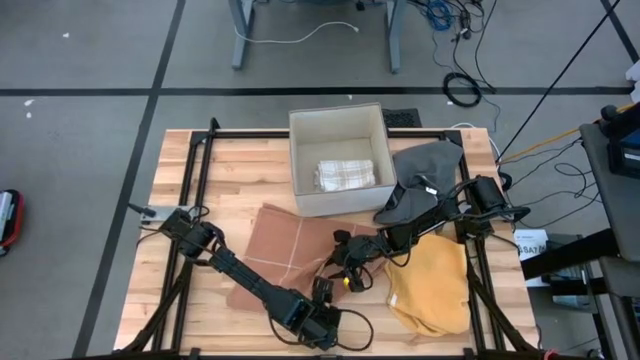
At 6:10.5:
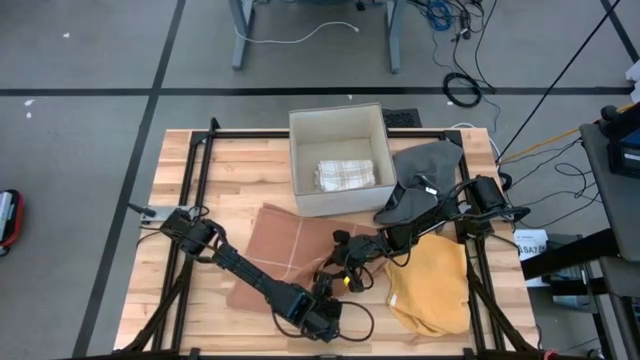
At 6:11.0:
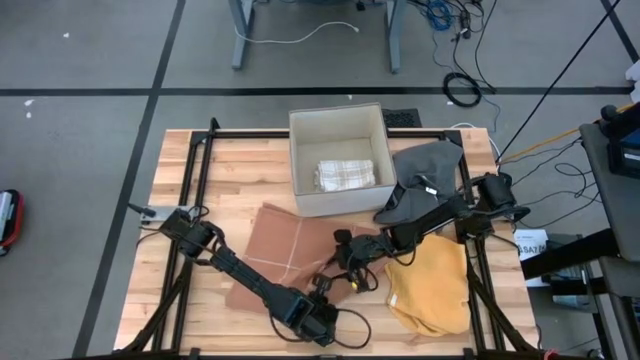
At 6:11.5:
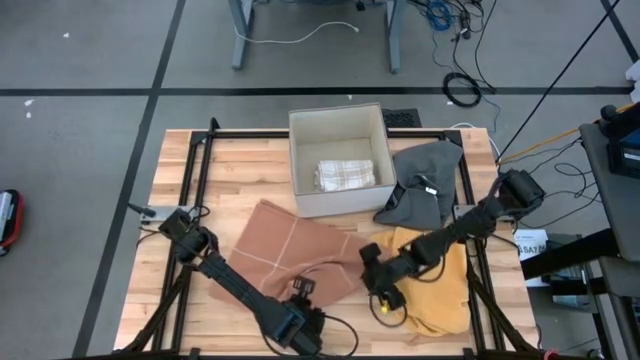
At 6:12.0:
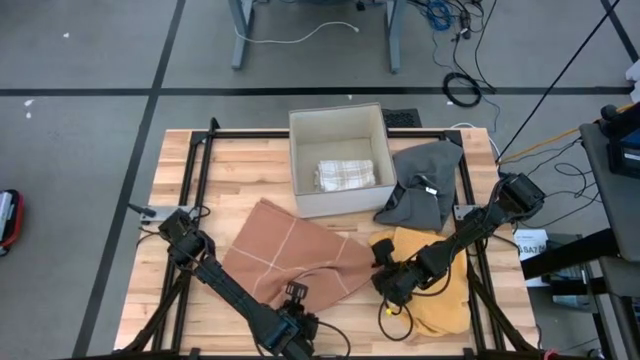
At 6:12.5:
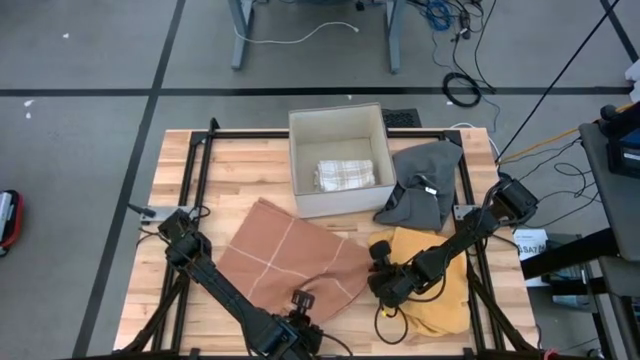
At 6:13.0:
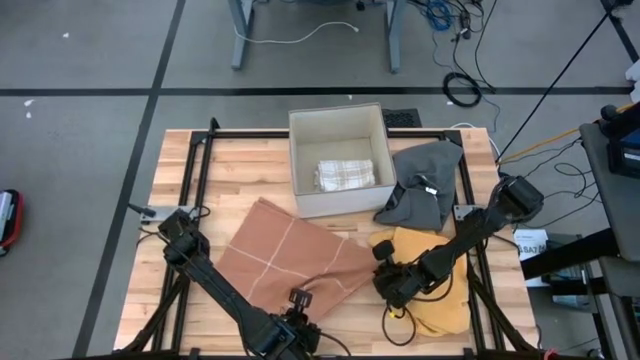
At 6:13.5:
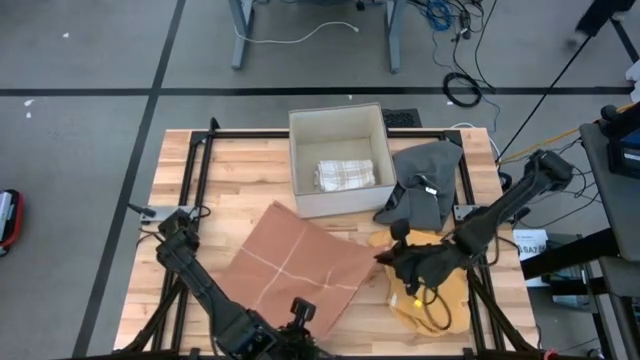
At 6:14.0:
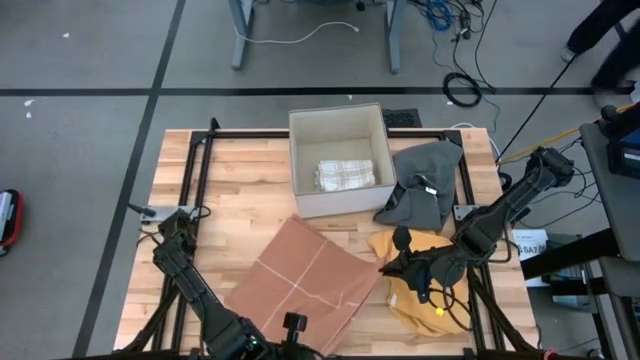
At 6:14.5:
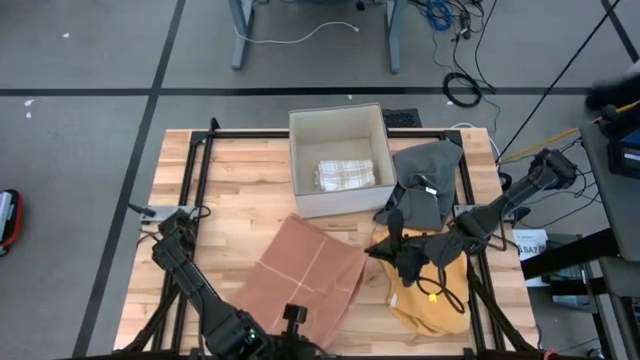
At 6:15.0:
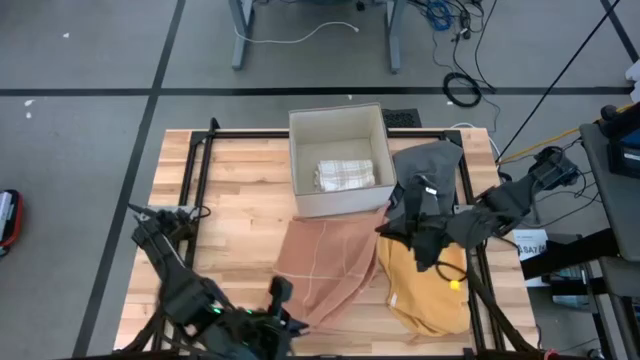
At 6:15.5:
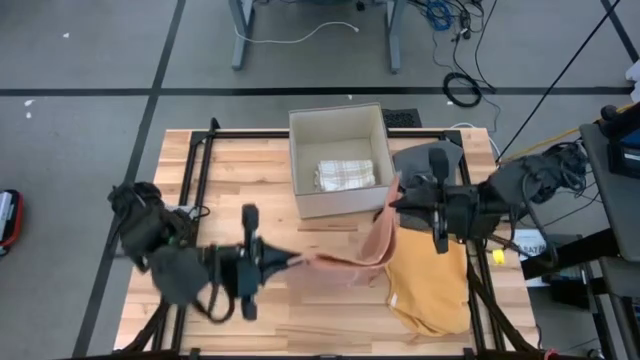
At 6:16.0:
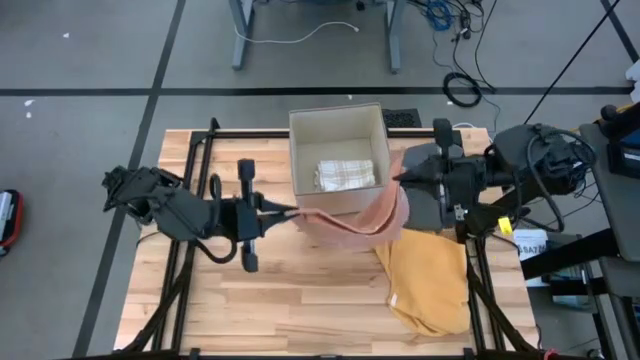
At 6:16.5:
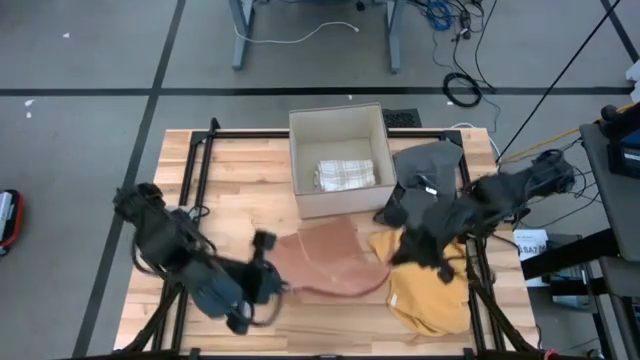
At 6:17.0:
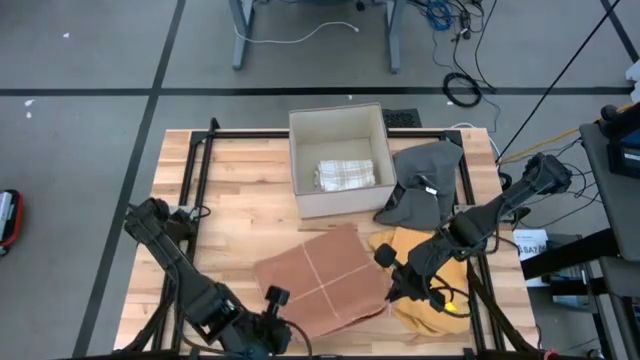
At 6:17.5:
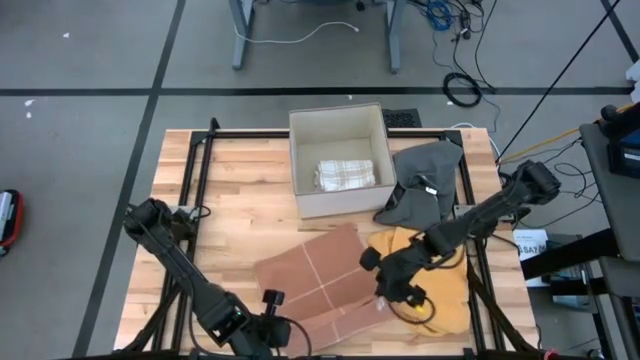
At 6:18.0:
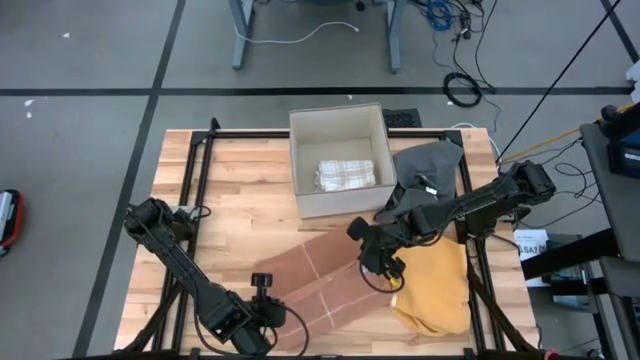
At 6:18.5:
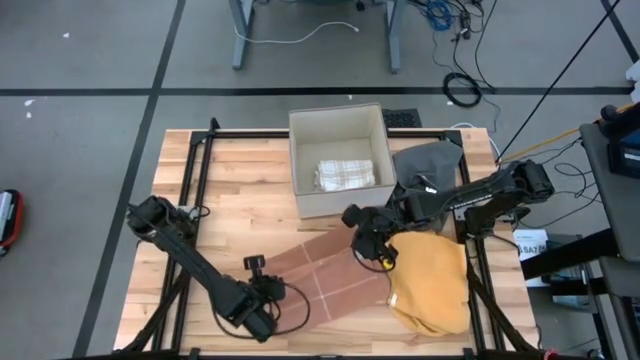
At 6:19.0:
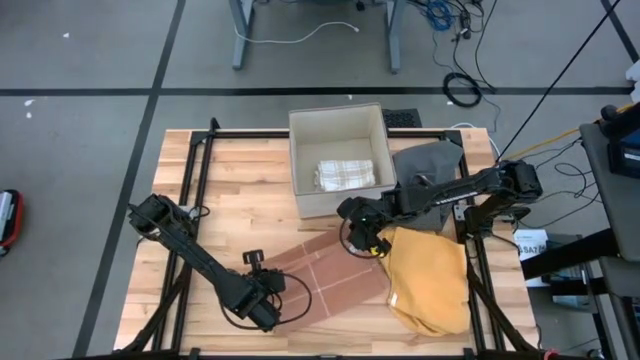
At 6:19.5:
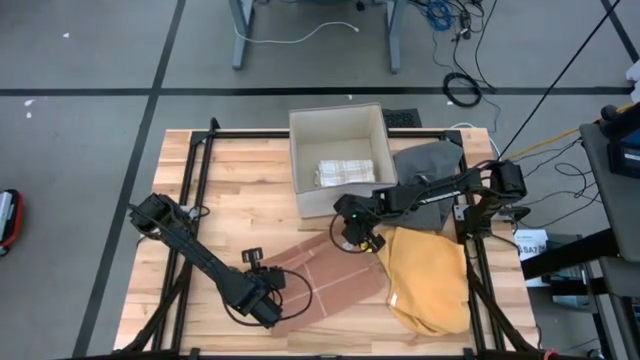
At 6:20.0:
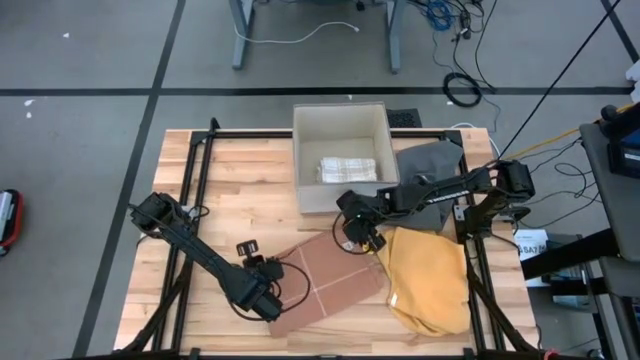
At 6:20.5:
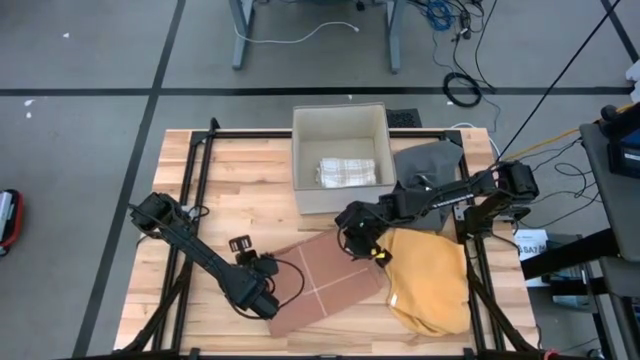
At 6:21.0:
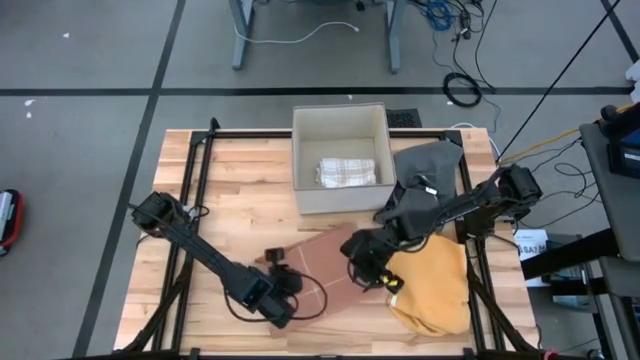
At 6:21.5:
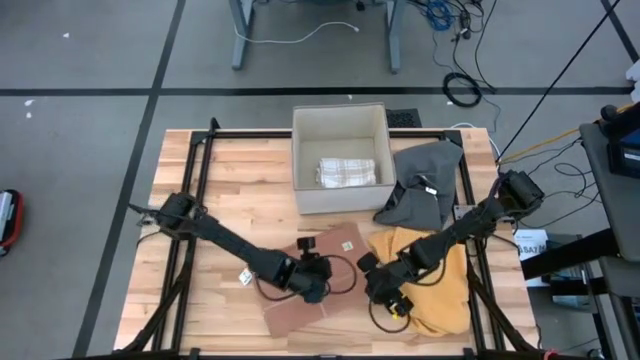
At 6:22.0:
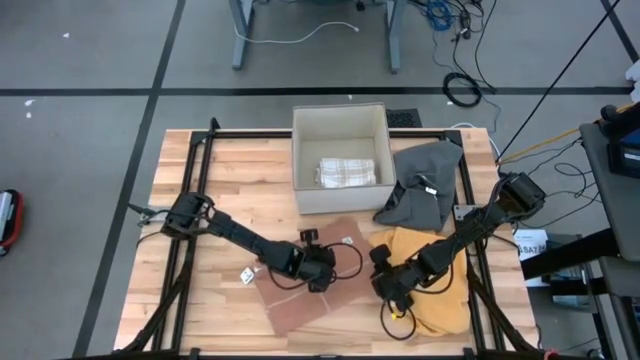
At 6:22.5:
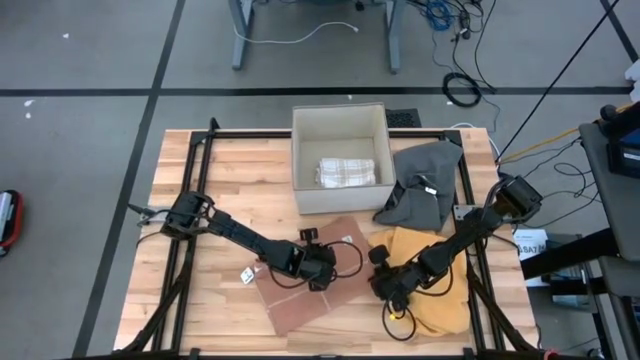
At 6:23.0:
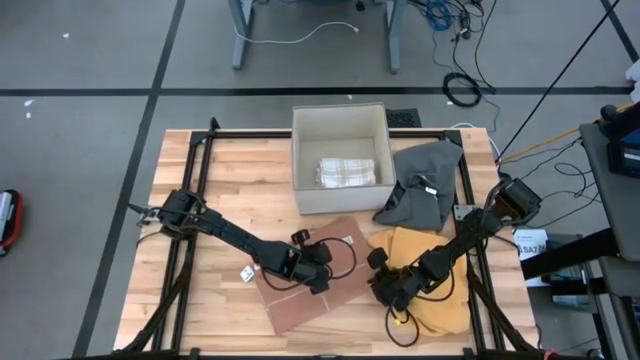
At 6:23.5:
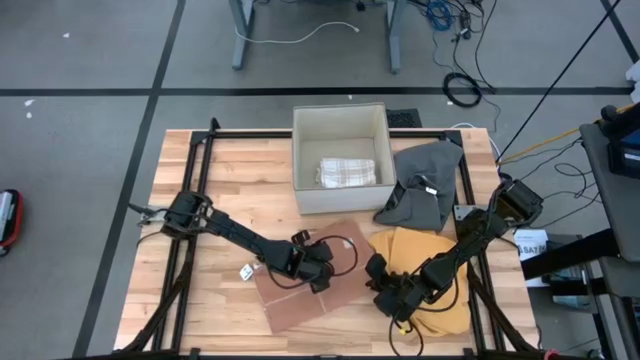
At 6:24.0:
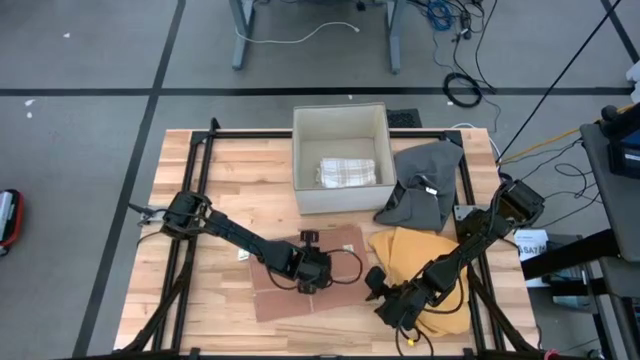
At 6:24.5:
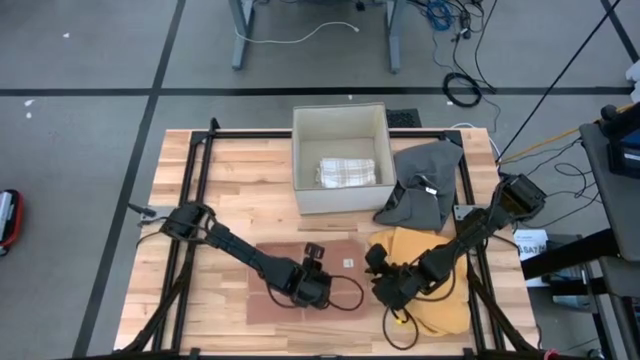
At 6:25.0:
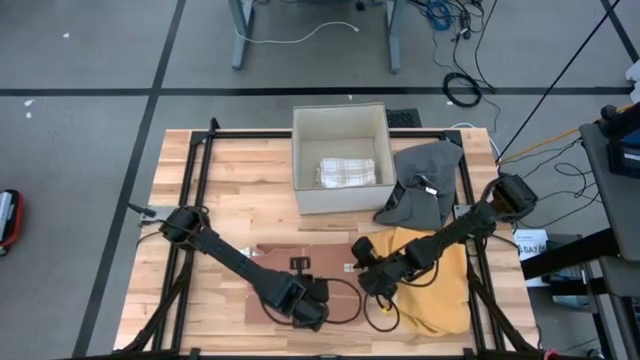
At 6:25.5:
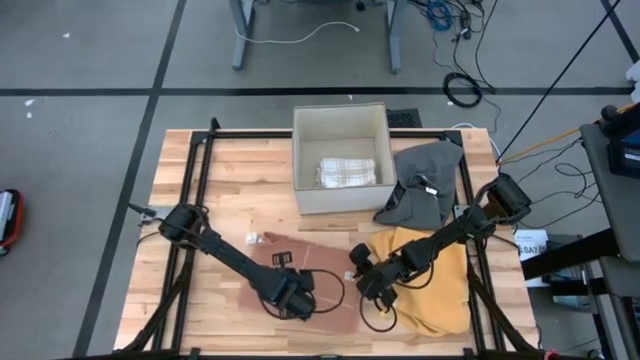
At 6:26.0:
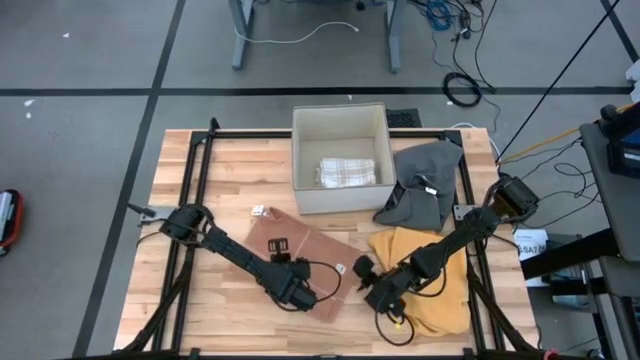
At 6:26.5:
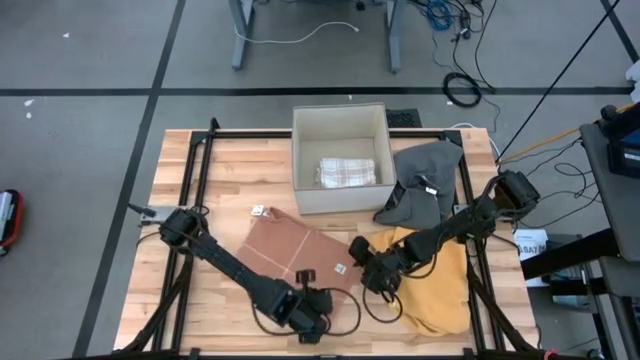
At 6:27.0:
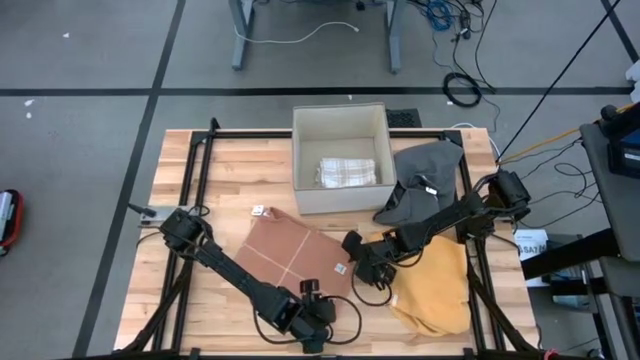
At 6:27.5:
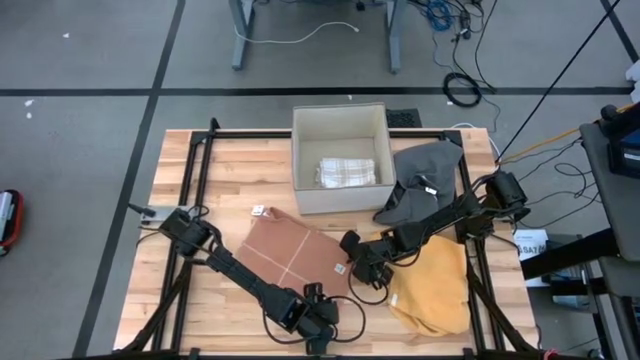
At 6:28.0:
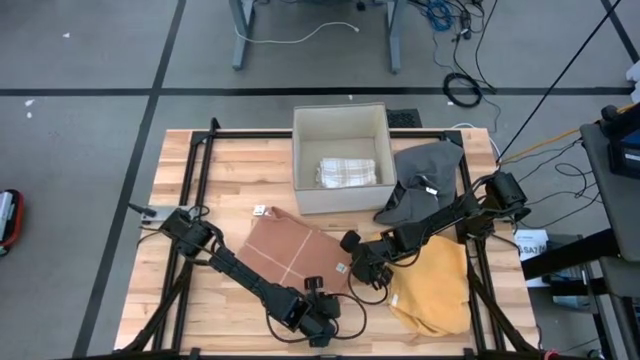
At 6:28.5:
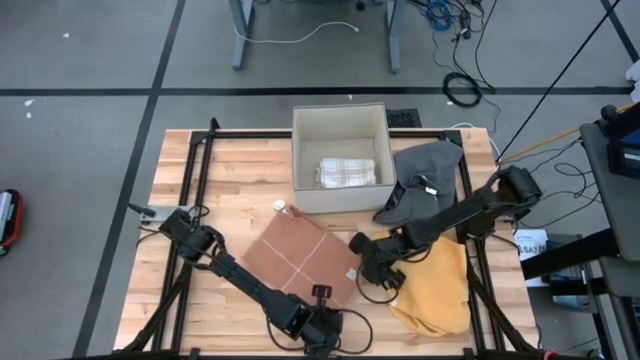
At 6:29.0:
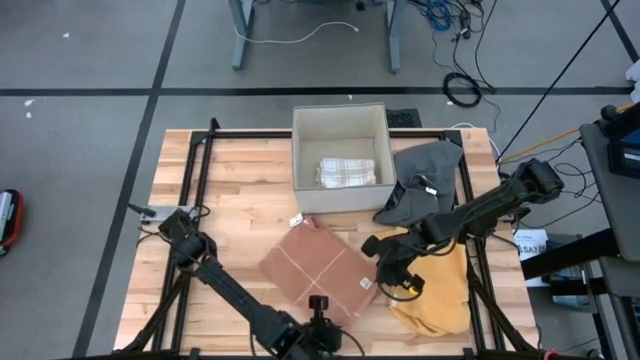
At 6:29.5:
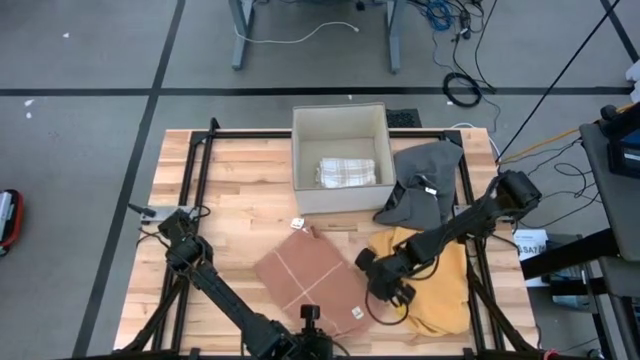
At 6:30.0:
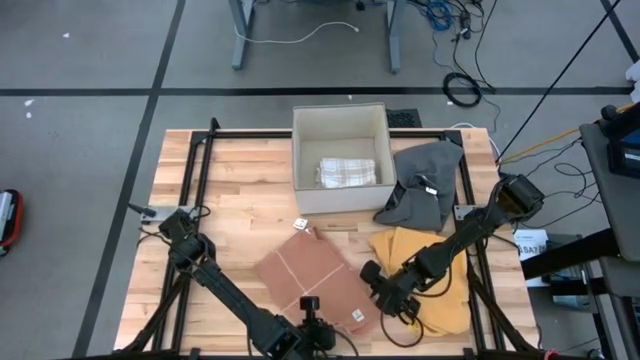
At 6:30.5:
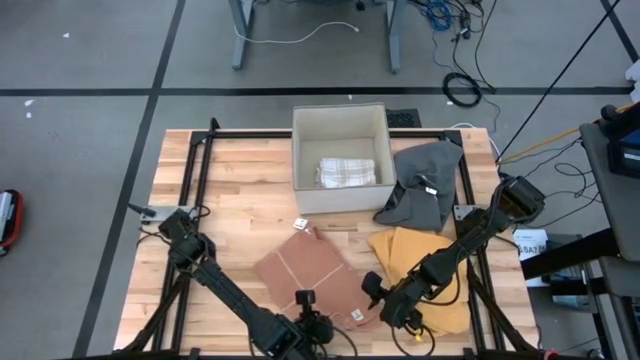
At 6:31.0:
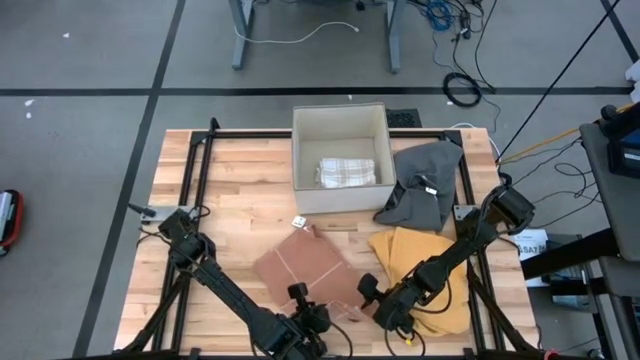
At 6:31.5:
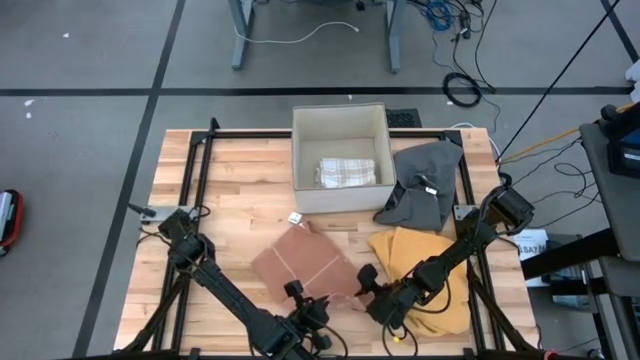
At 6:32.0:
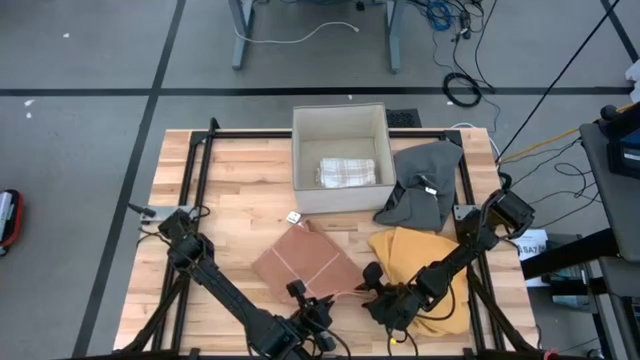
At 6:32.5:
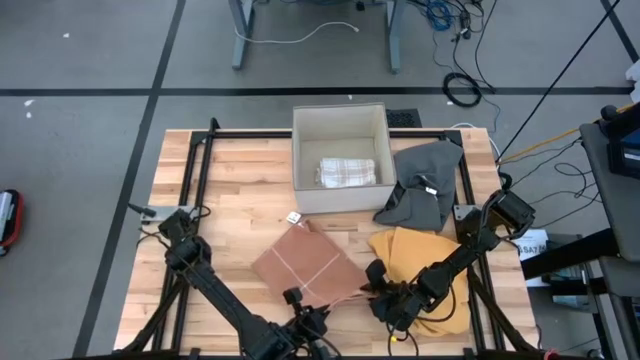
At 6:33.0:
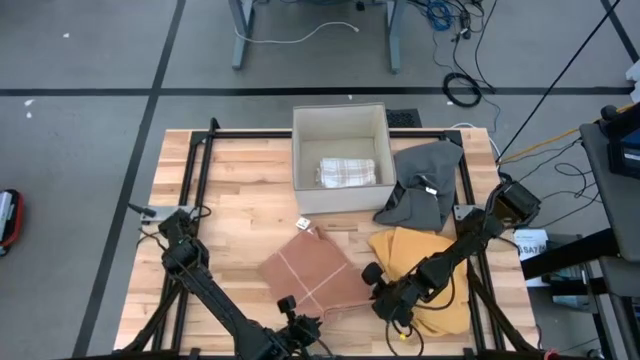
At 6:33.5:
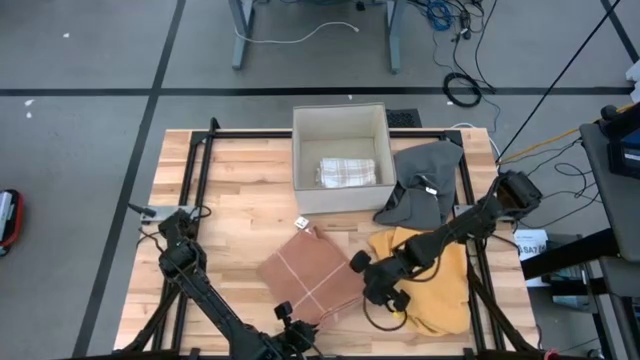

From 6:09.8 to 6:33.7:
Task: Fold towel
Fold the light brown towel
